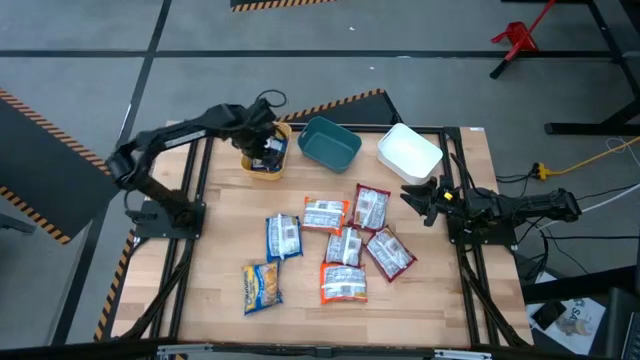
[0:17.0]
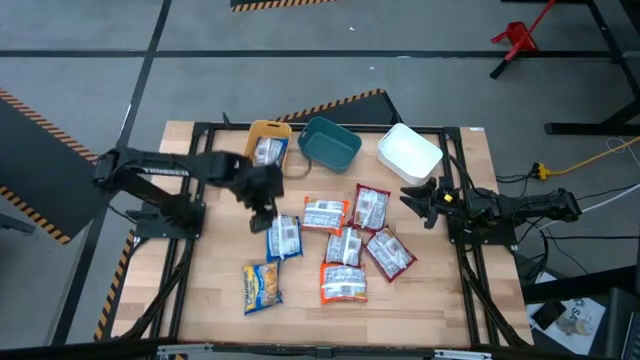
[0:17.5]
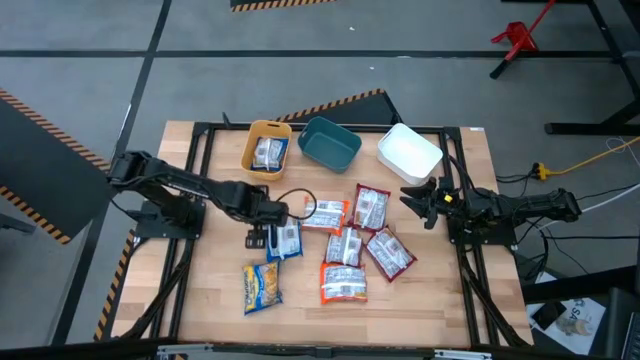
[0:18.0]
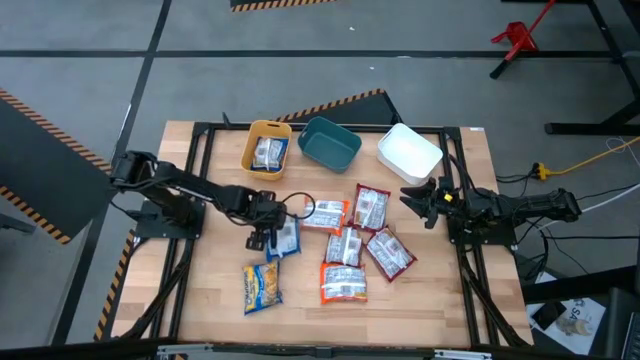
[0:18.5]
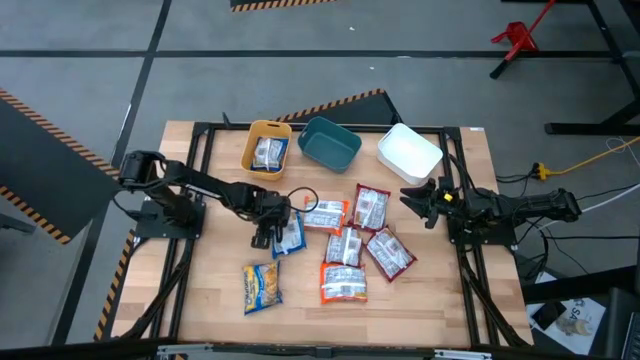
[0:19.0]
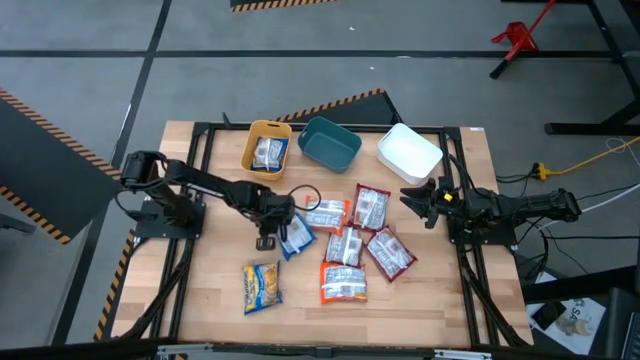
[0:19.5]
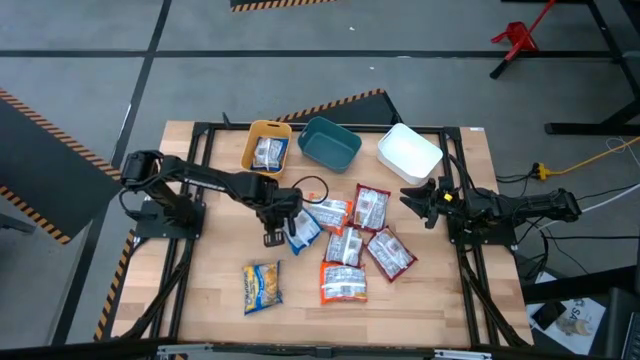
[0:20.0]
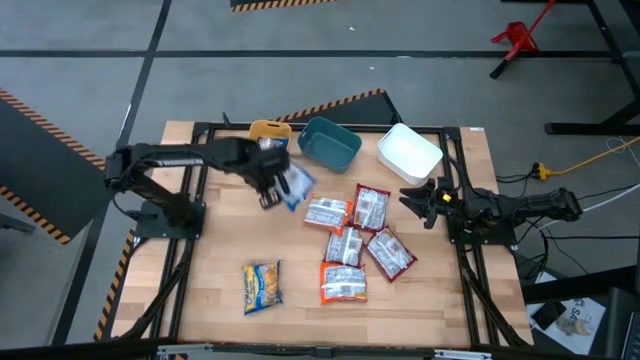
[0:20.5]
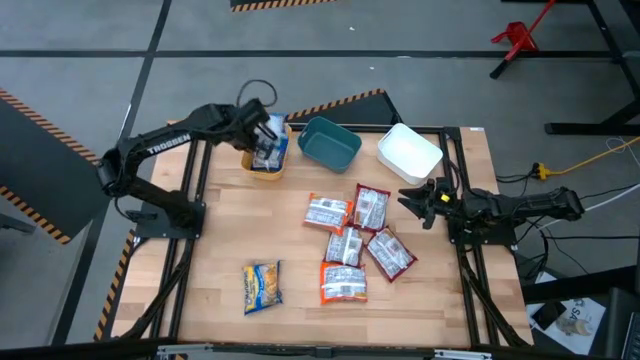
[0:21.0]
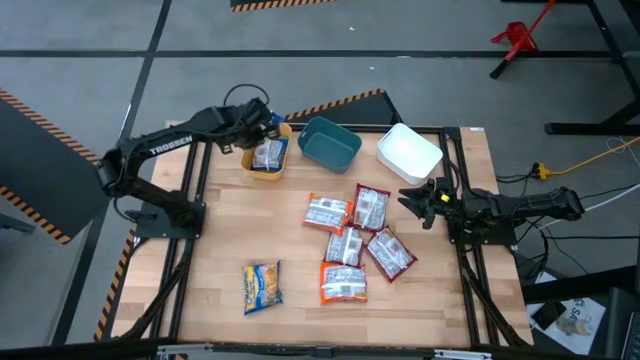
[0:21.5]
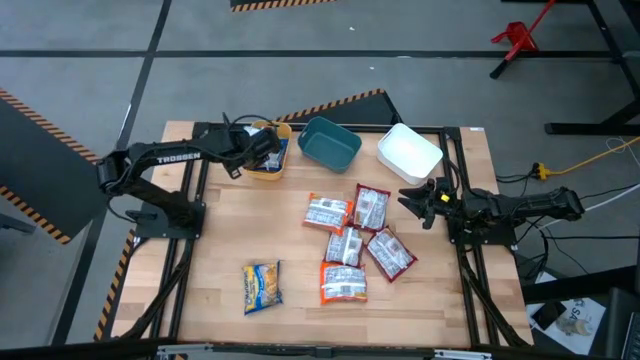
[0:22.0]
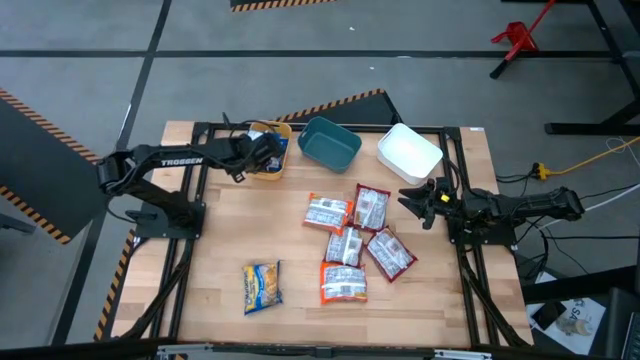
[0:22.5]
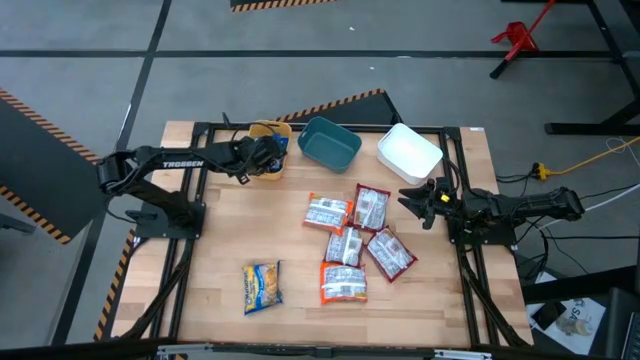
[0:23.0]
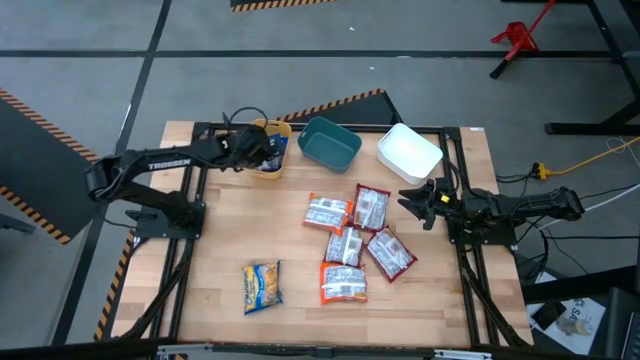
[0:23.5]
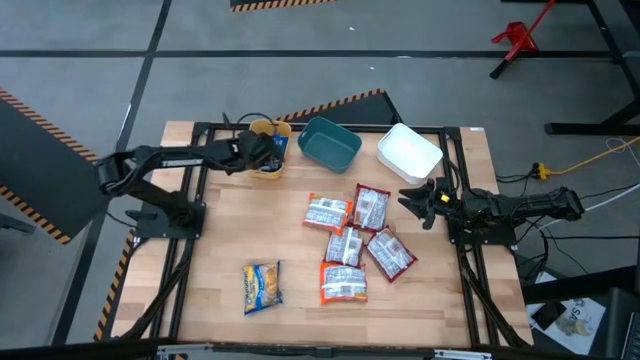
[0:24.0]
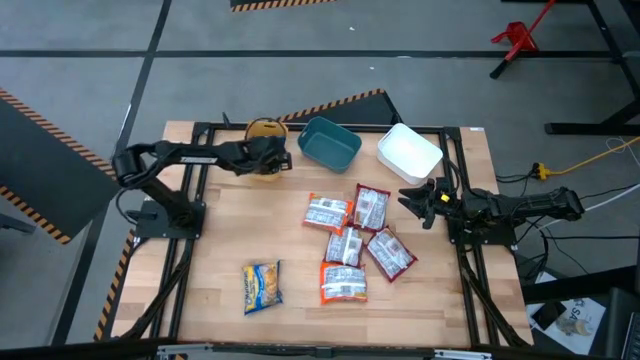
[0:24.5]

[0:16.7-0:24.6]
Task: Sort Maruchan noodles
Put the top blue noodle pack into the yellow bin

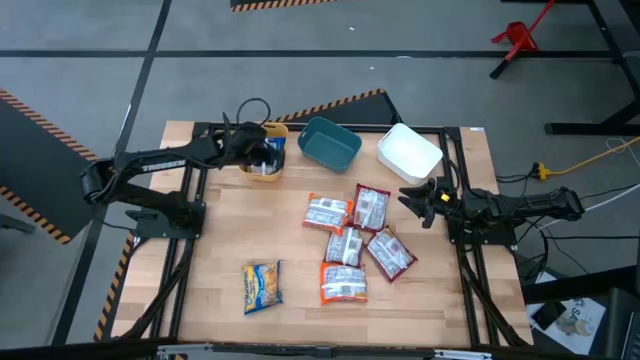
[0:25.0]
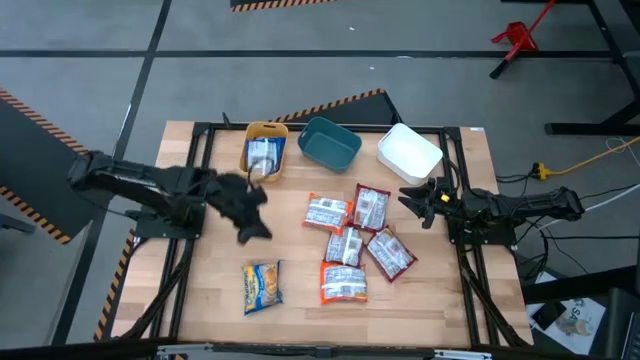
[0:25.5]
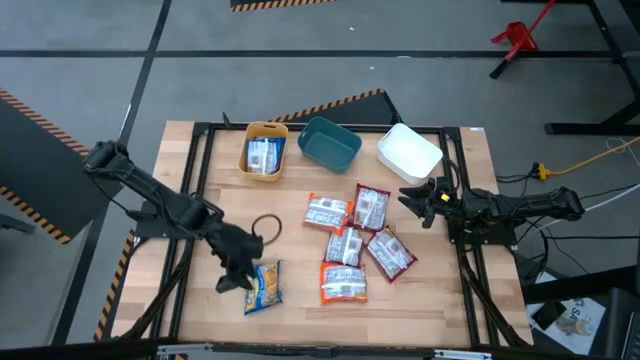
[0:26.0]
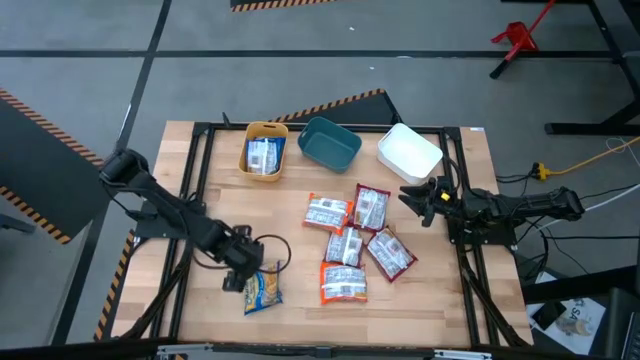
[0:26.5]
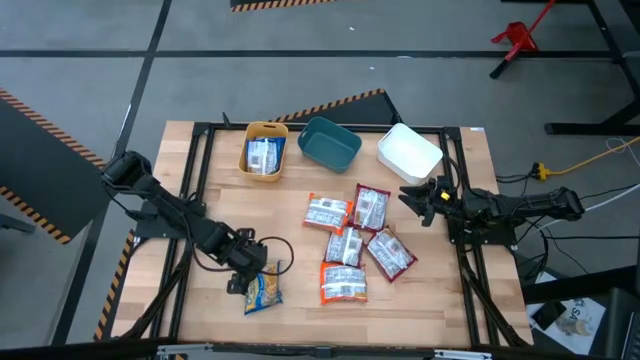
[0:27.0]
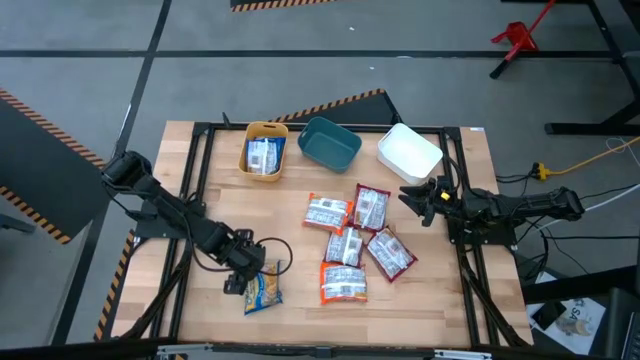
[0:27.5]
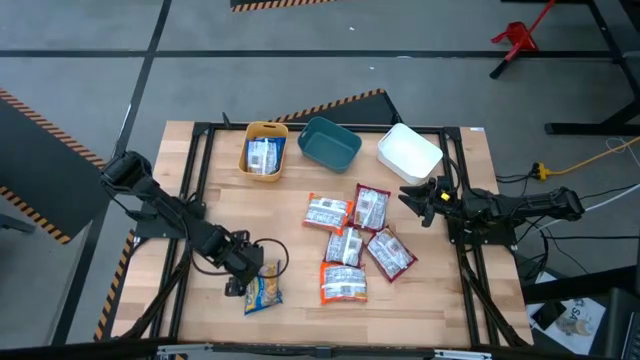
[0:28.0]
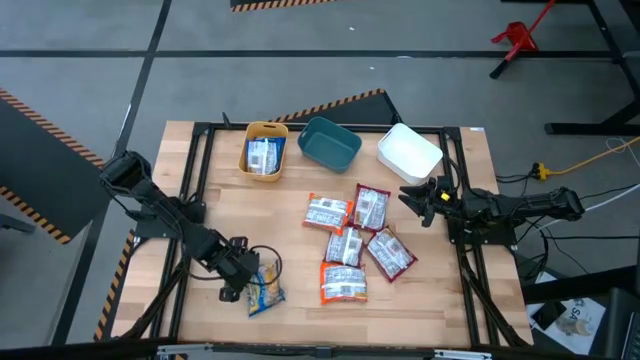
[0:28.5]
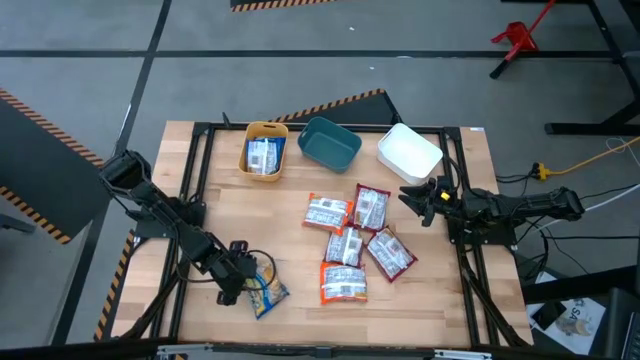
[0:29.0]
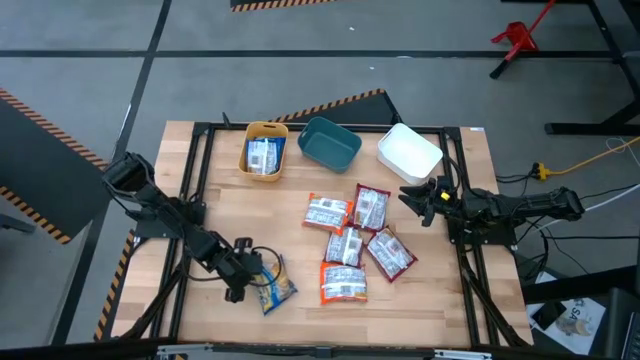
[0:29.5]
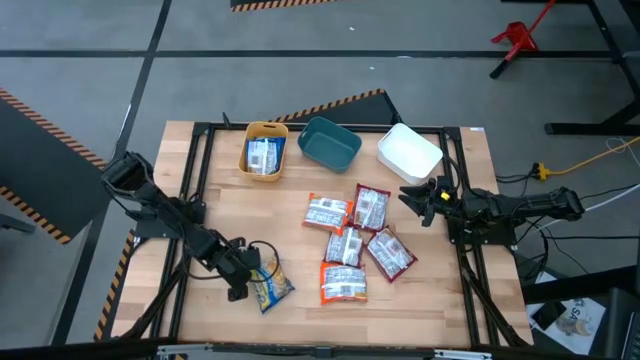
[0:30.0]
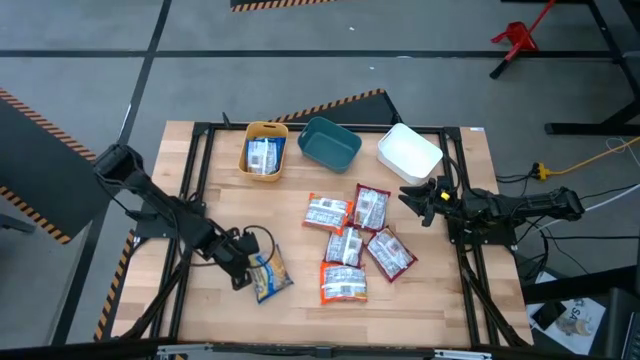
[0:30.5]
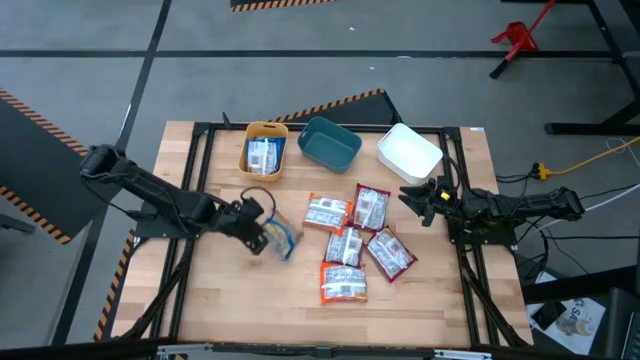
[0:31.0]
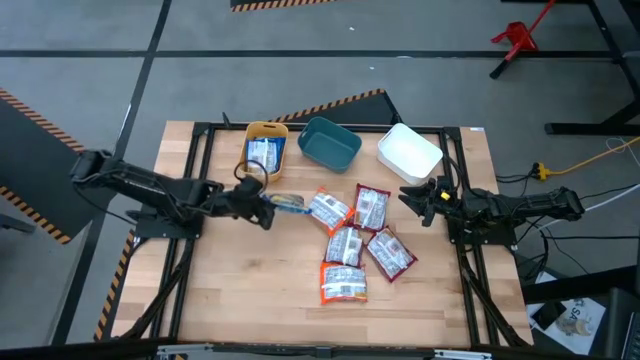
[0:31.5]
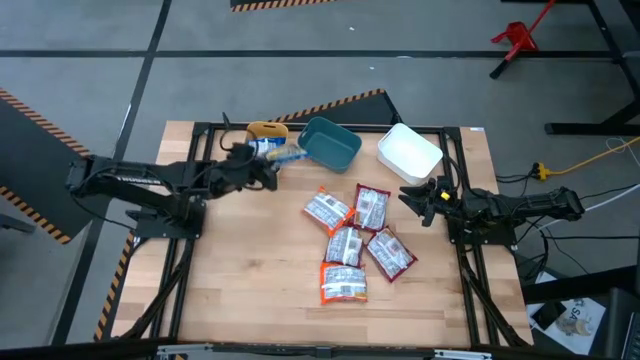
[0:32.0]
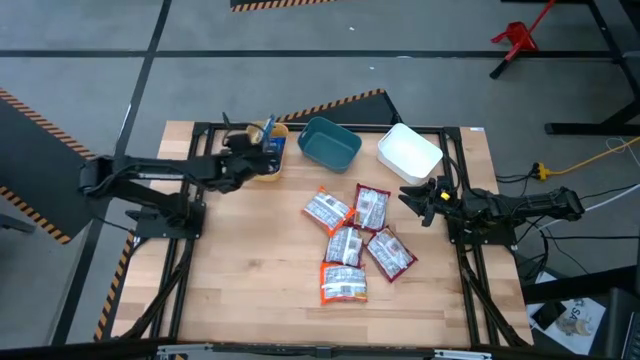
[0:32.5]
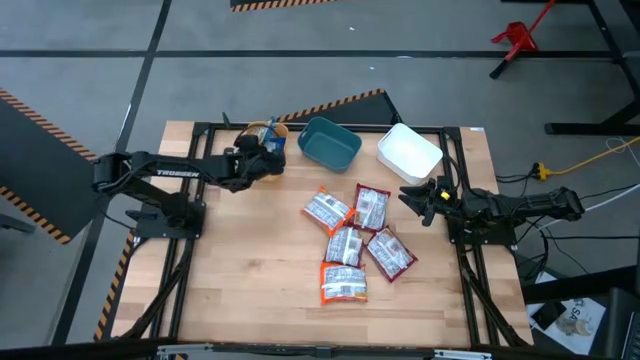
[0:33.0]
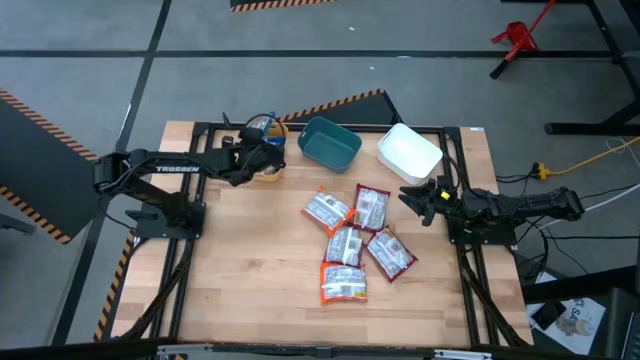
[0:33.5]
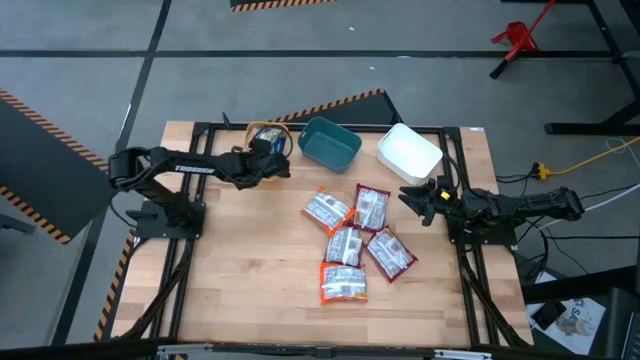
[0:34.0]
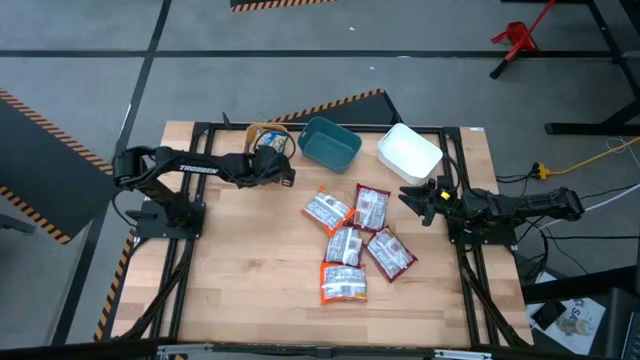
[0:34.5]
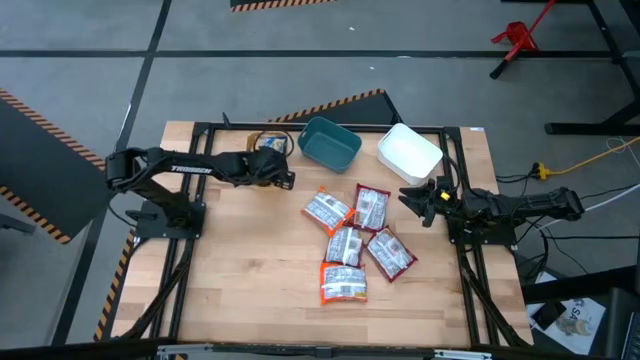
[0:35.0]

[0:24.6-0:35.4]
Put the blue noodle pack into the yellow bin

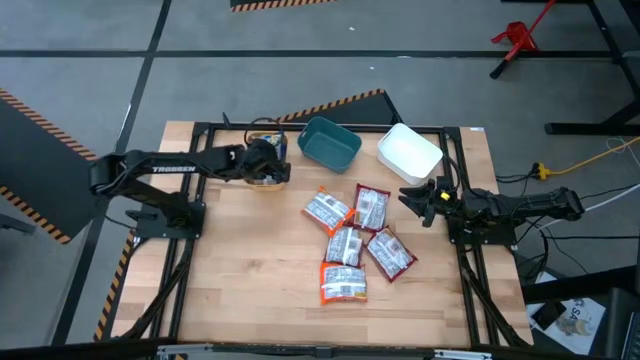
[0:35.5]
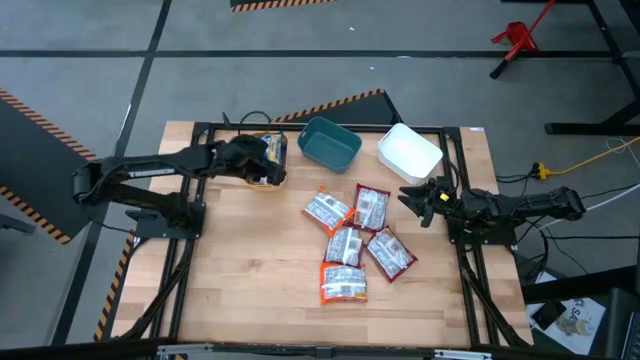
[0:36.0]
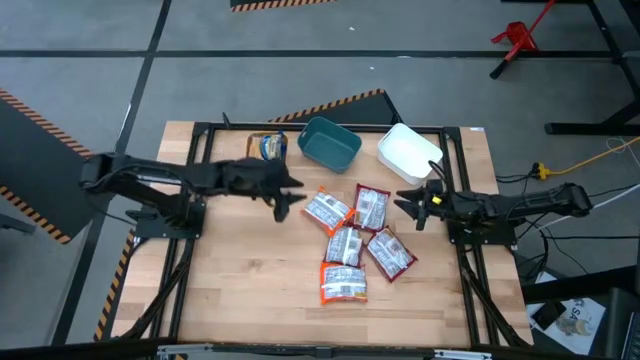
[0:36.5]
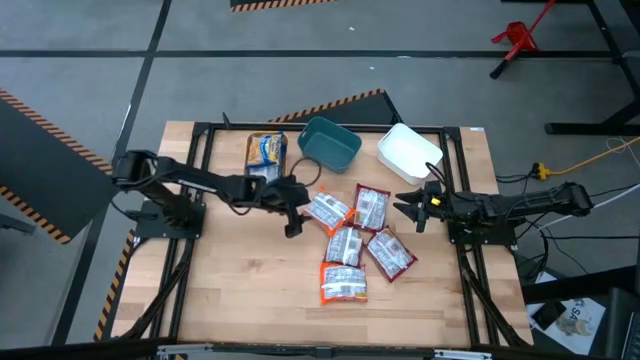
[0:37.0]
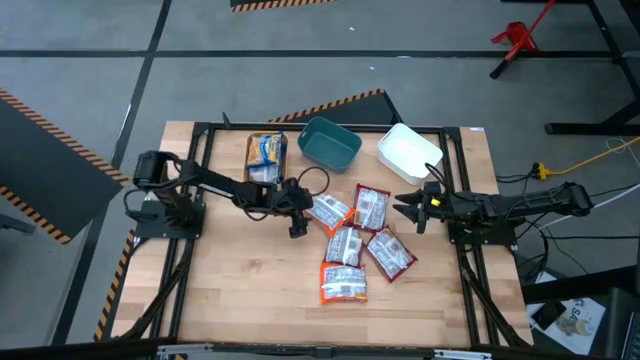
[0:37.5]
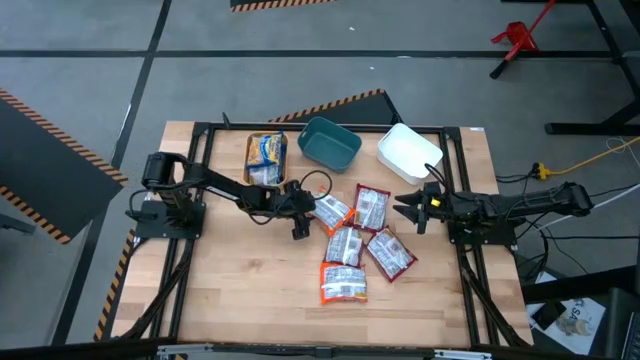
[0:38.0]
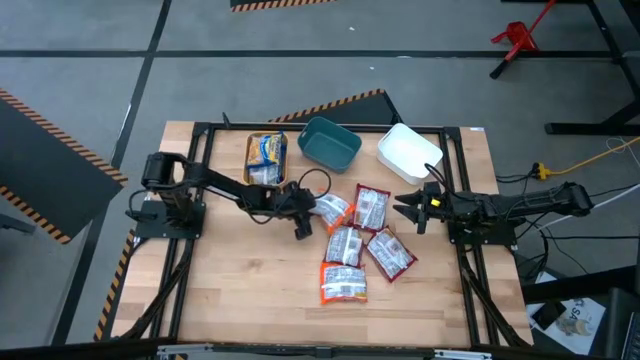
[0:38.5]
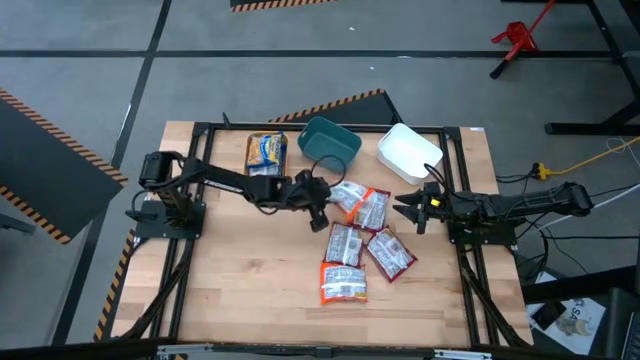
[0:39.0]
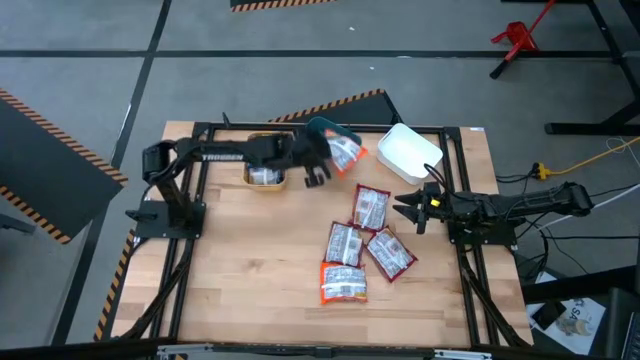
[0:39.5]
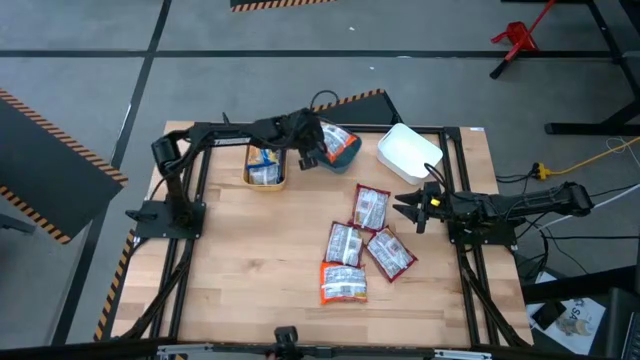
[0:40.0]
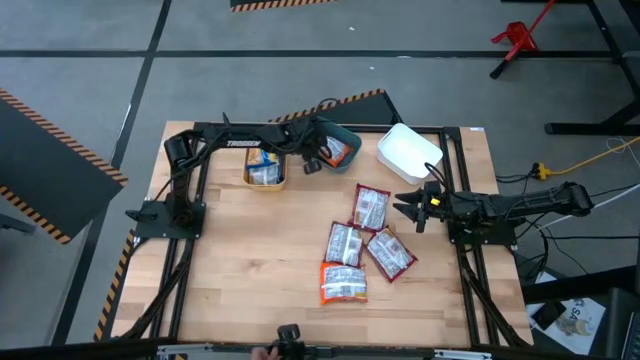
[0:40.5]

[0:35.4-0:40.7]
Put the top orange noodle pack into the blue bin
